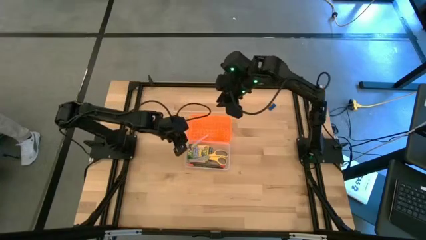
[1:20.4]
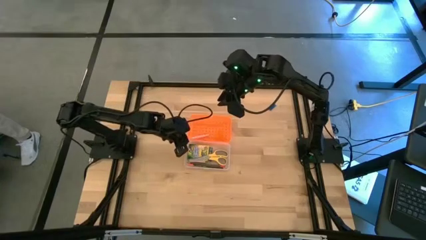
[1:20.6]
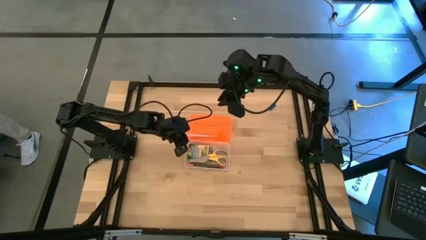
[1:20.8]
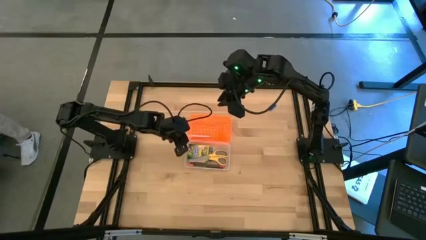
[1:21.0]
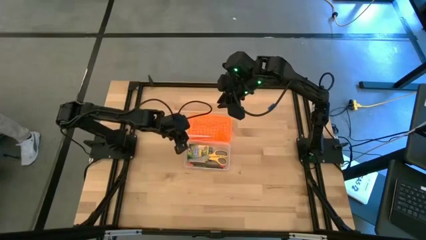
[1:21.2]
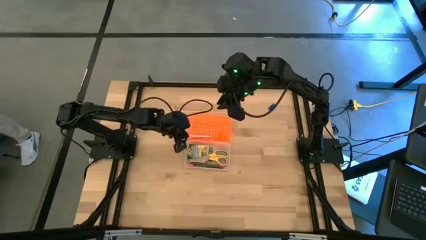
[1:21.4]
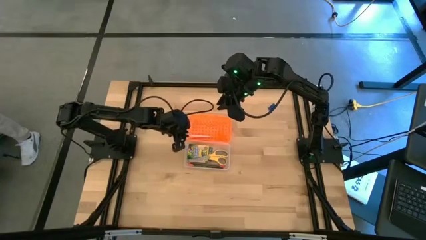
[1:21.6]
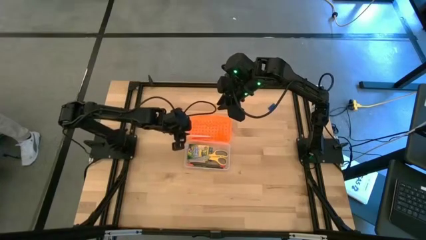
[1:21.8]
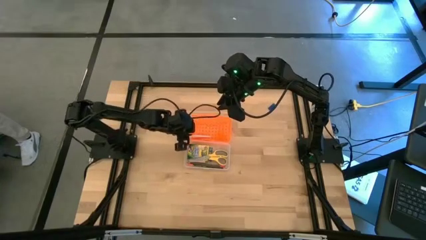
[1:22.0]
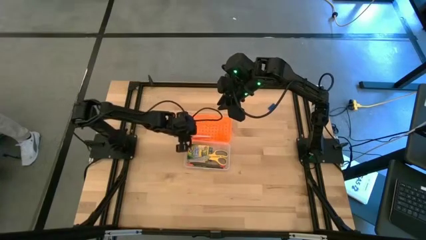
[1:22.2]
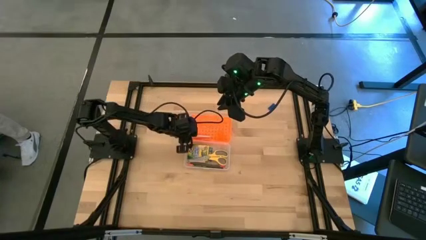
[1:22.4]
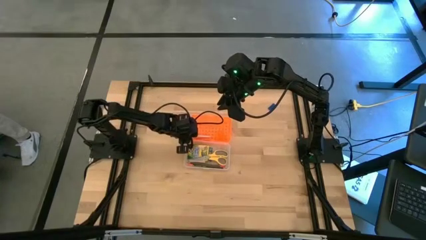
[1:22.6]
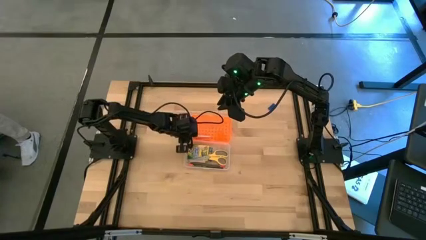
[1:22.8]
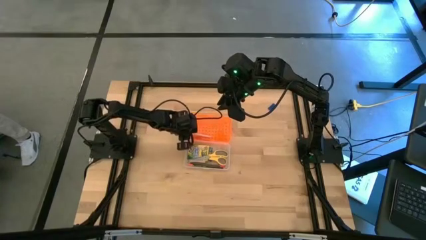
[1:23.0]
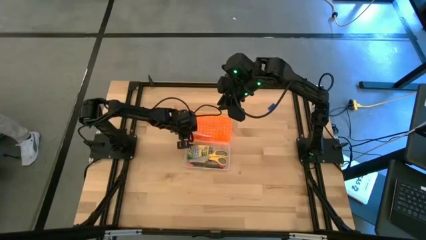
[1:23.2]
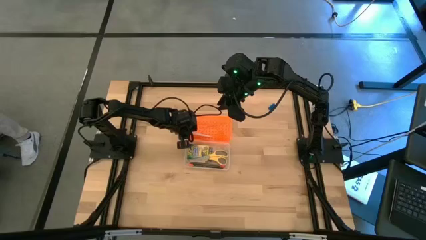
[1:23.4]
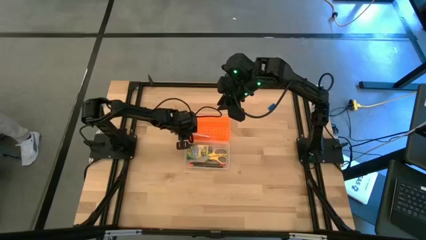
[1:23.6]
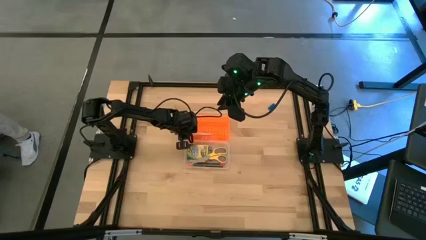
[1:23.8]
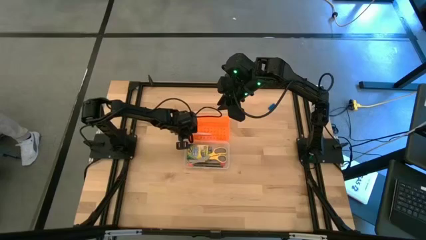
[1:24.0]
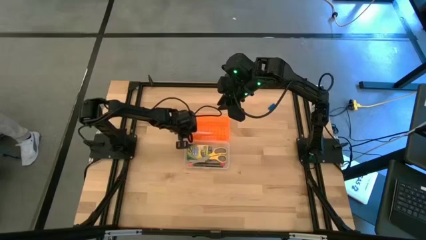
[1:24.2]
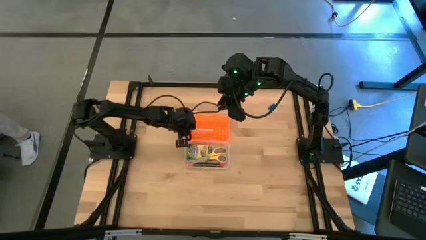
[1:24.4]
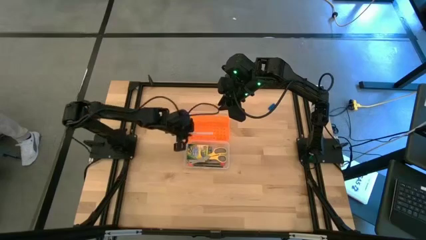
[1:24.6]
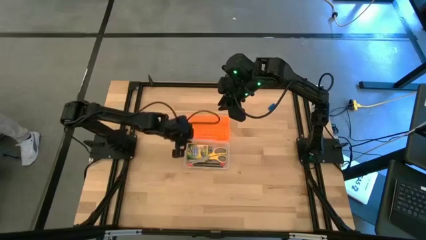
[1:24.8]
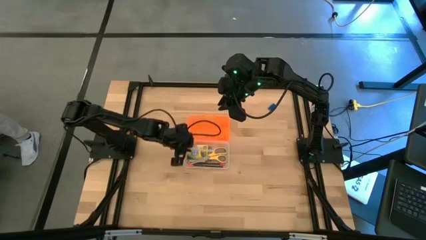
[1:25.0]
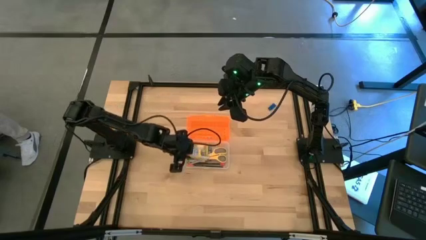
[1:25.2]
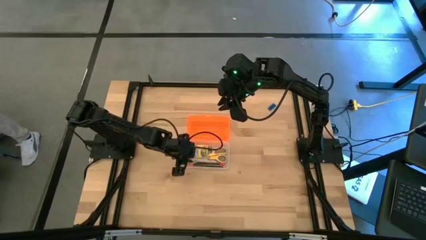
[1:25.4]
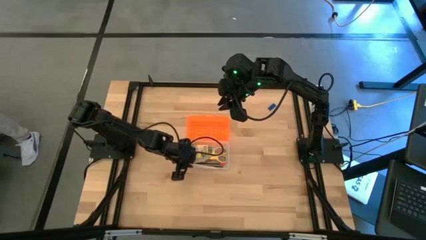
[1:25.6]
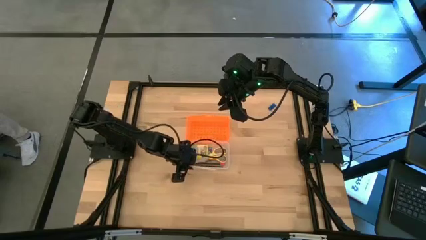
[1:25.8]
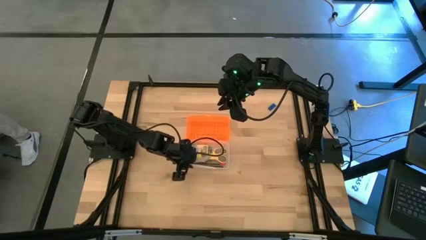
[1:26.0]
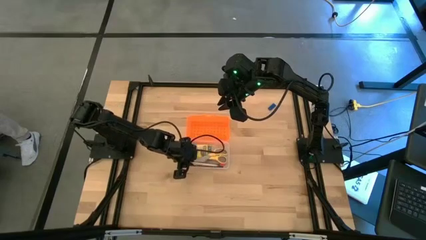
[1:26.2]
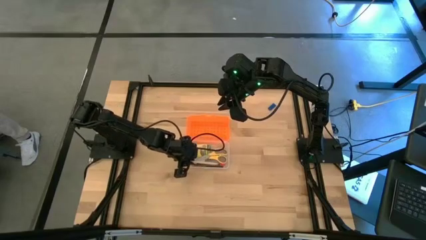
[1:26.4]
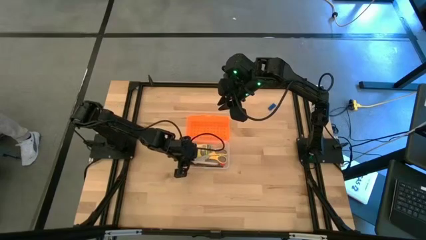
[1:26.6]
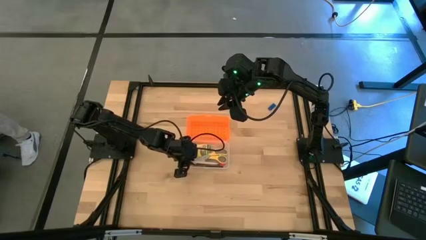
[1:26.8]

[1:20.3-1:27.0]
Task: Pack school essentials
Put the pink pen into the supply box

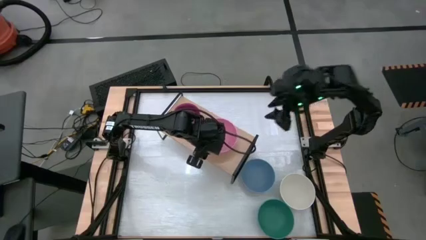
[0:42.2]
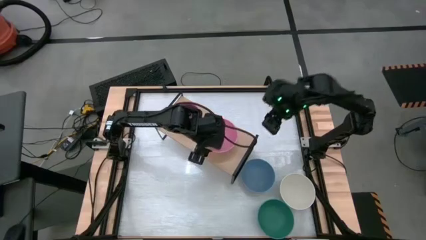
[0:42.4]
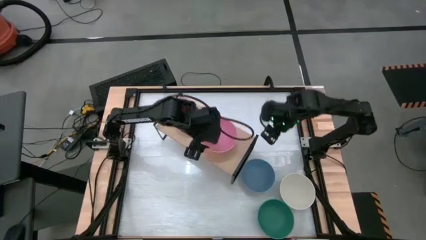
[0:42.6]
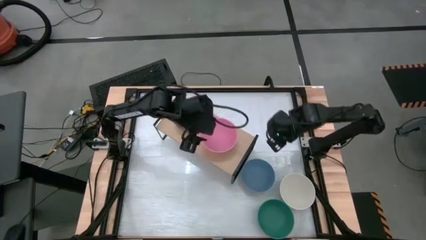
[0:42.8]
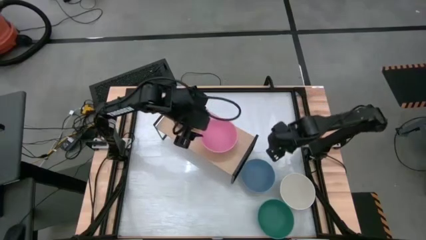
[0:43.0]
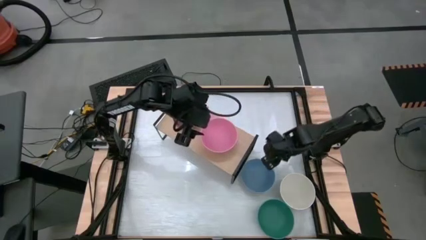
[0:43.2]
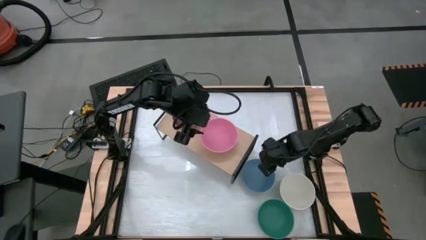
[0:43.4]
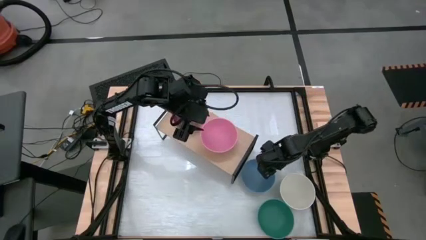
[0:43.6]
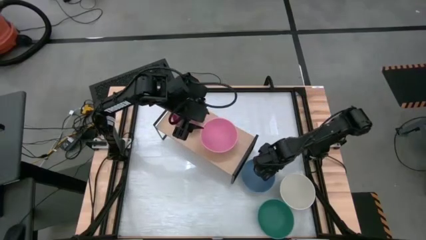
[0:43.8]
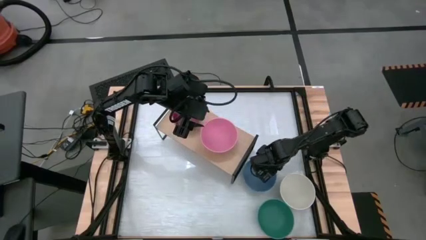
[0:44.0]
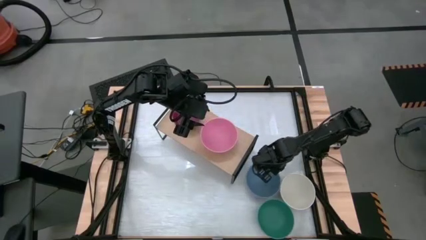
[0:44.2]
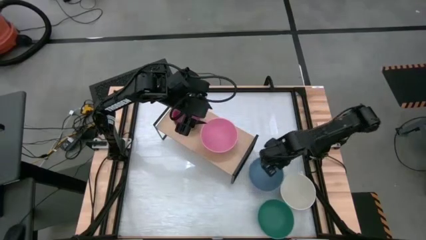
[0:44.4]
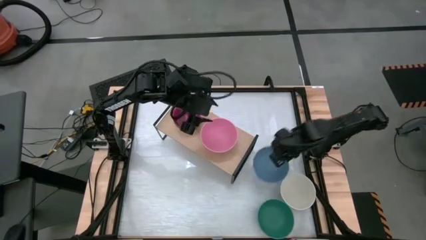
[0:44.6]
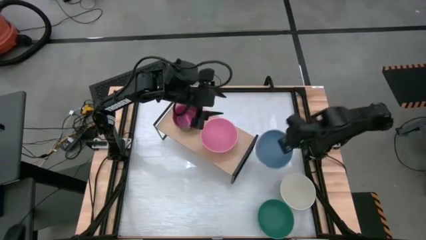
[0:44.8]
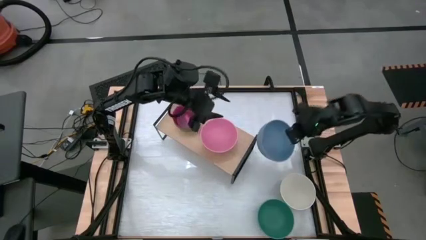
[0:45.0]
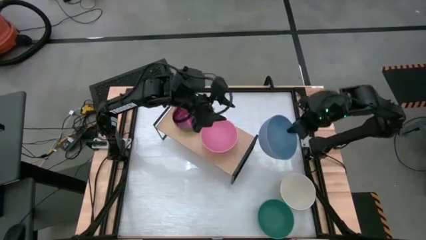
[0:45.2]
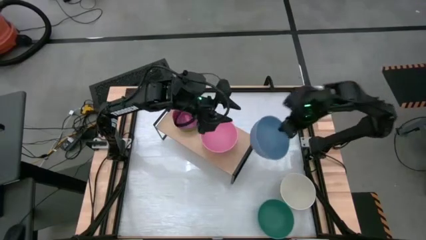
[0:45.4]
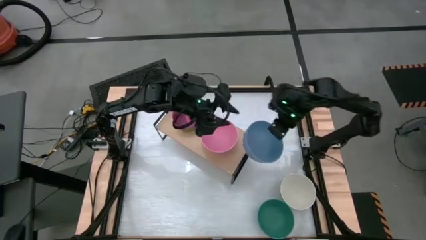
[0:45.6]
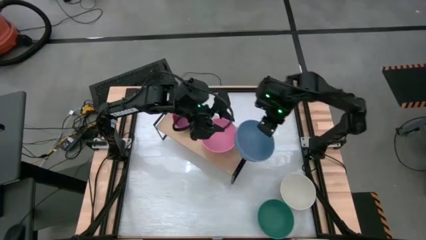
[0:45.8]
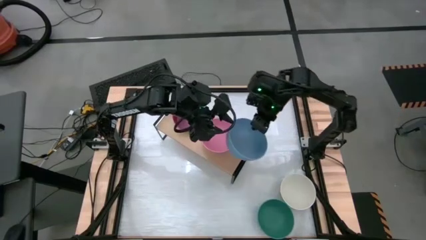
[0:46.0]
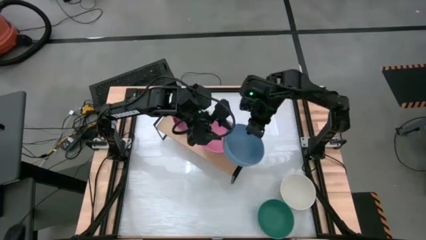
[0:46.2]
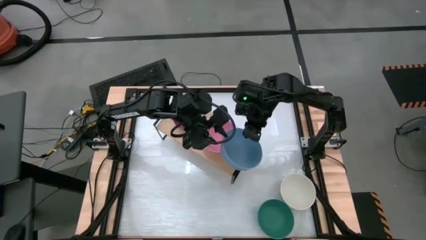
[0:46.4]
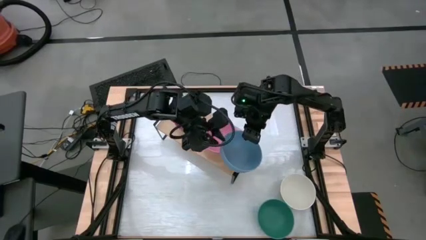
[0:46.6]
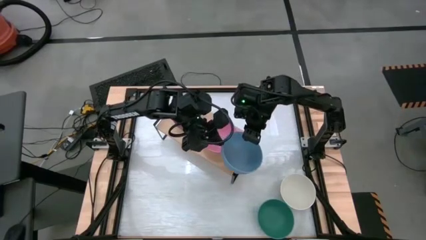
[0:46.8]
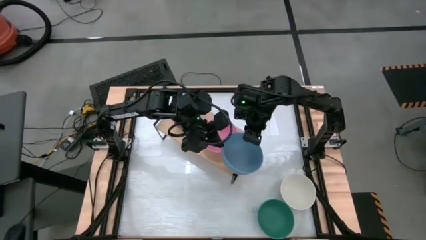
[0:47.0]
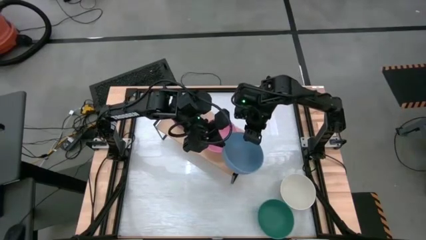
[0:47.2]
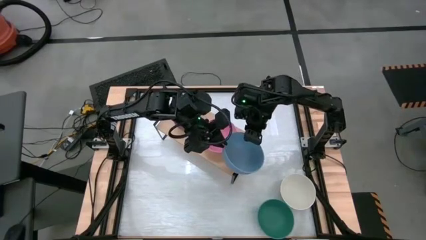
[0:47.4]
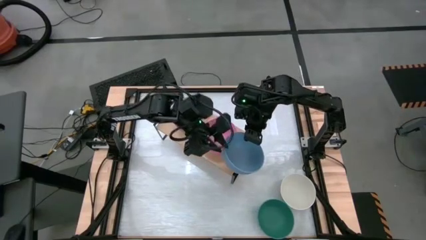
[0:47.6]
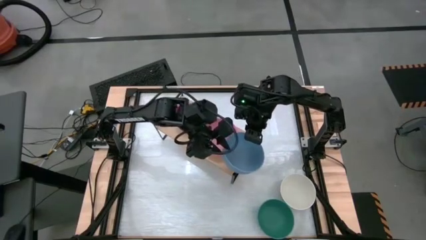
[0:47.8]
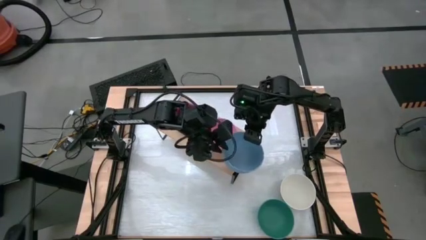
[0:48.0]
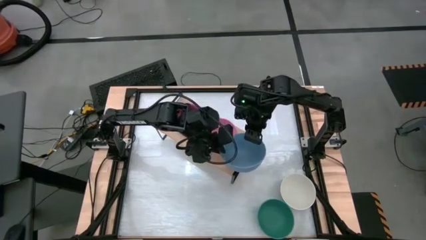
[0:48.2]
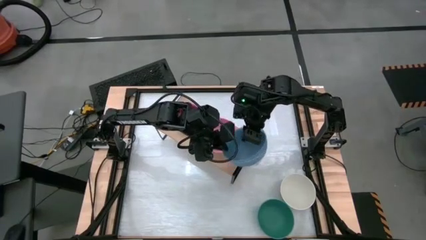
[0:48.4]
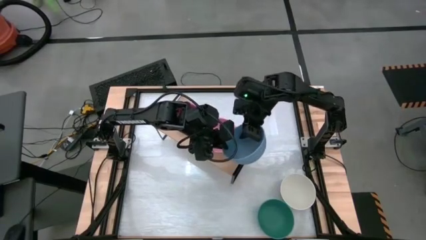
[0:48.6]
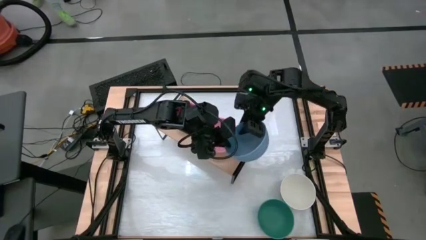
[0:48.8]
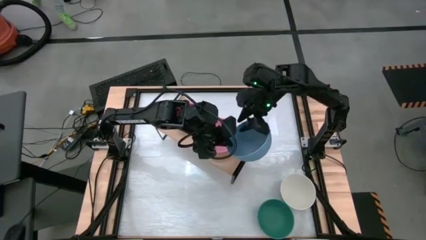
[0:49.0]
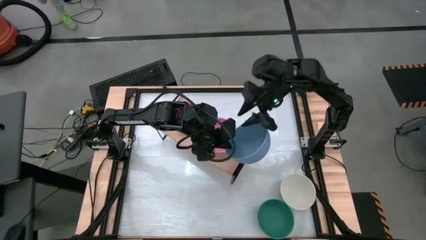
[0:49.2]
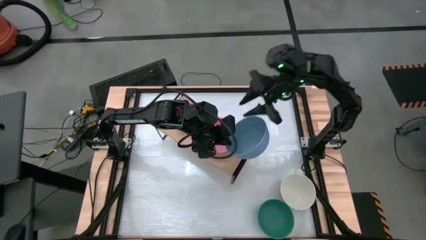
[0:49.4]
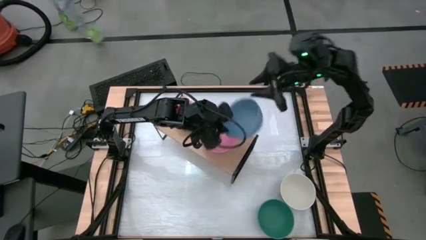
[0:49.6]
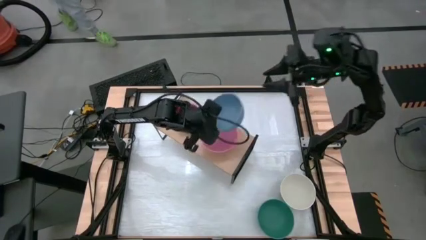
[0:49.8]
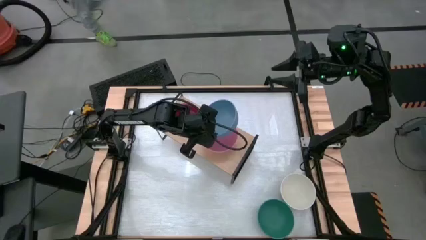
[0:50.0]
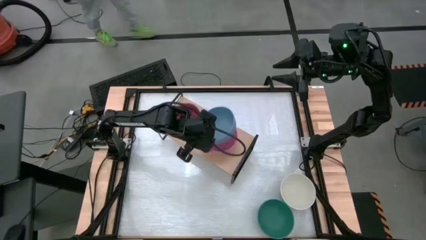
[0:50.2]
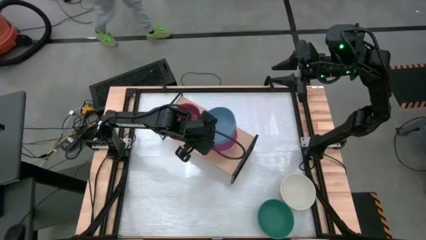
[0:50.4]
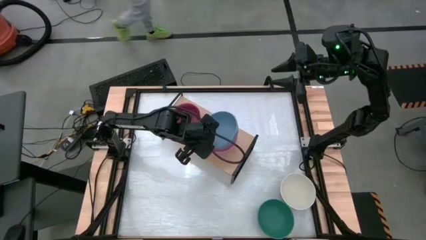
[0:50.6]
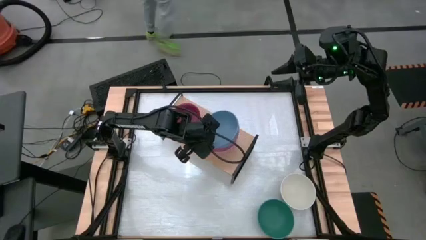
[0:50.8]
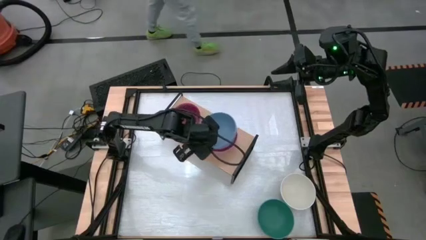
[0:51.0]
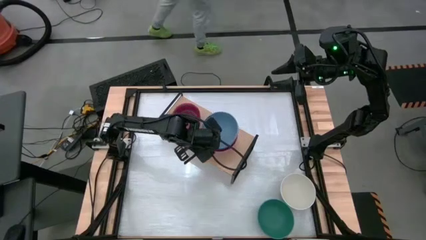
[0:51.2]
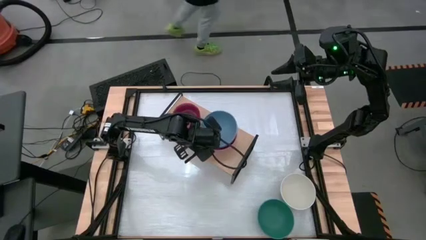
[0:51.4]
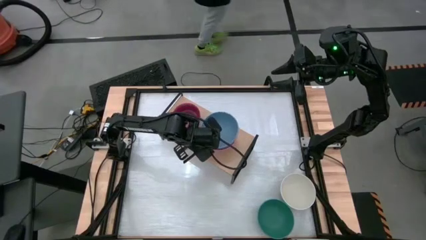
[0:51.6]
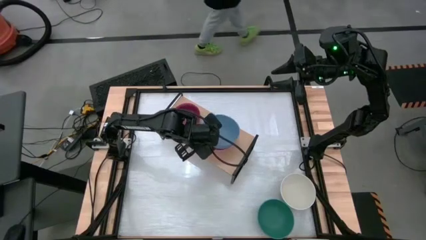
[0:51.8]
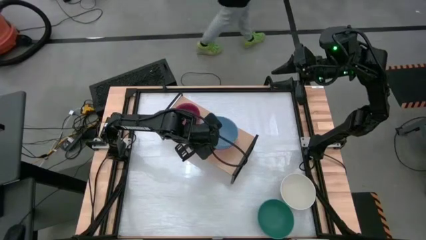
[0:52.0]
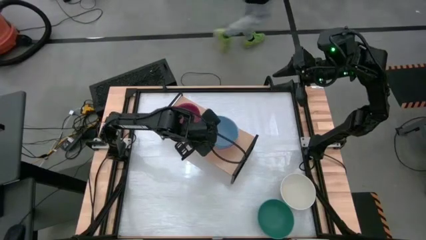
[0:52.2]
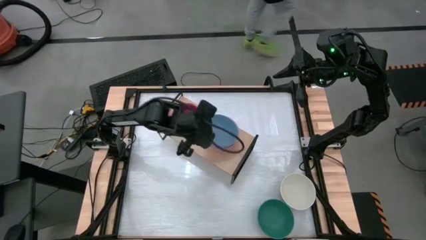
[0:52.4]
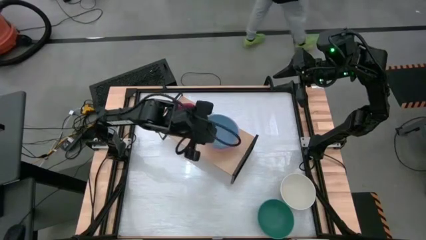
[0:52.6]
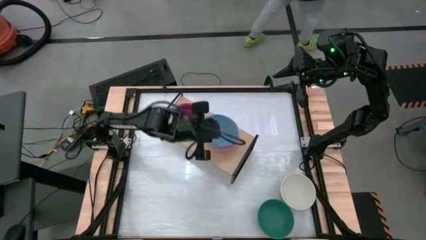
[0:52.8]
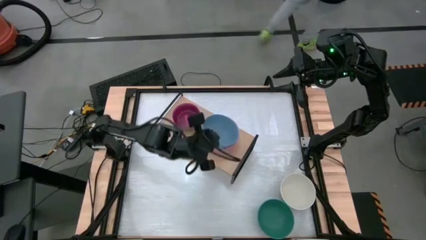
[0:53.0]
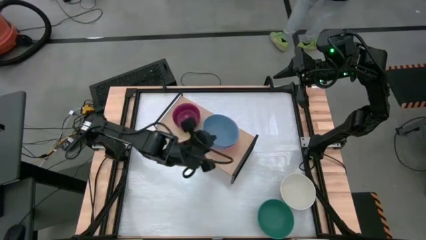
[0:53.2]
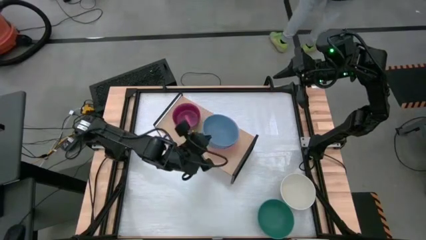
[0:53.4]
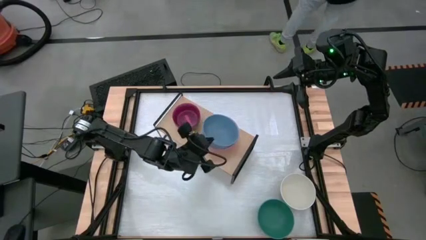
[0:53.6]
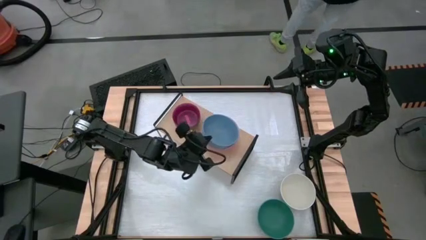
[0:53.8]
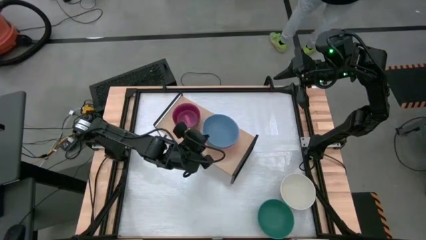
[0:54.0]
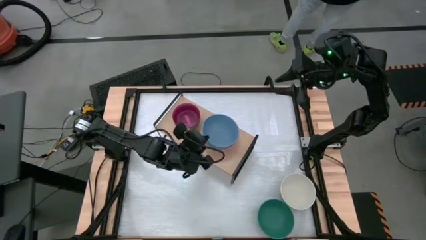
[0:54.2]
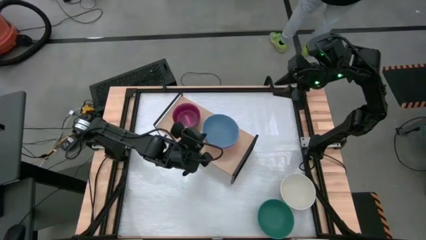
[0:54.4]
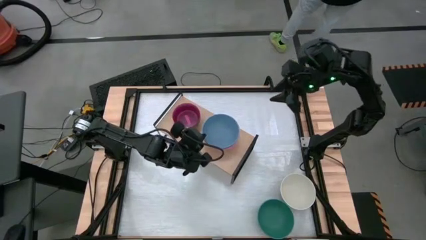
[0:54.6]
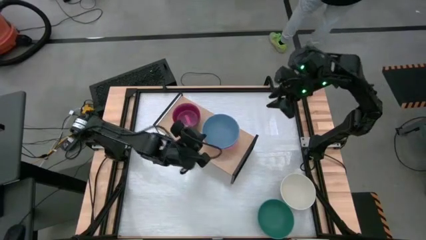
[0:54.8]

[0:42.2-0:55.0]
Task: Place and stack bowls onto a shelf
Stack the large blue bowl on the top of the large pink bowl on the shelf
